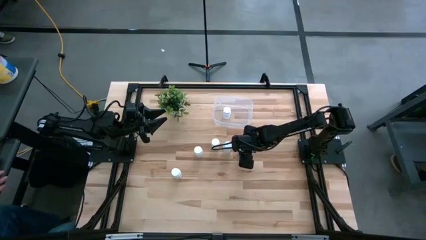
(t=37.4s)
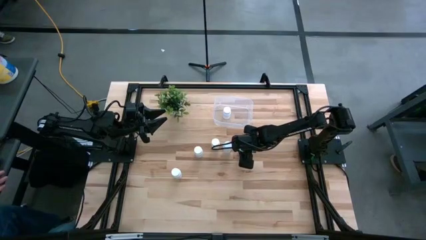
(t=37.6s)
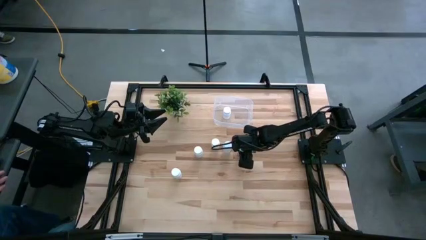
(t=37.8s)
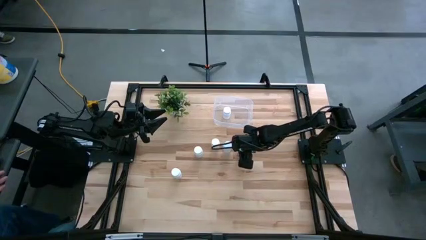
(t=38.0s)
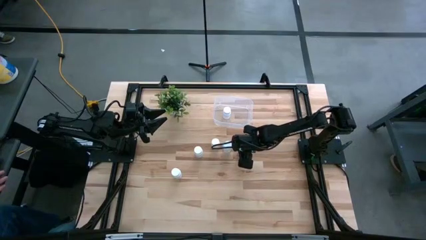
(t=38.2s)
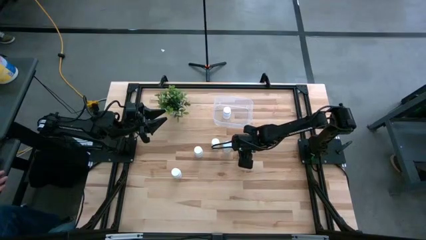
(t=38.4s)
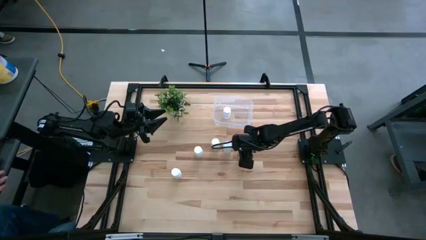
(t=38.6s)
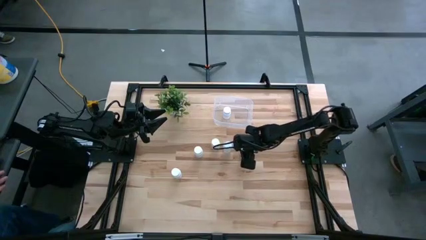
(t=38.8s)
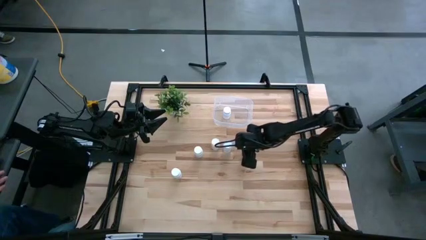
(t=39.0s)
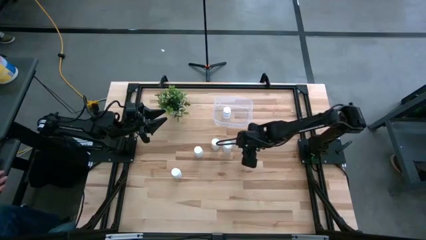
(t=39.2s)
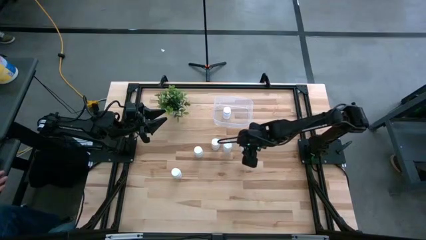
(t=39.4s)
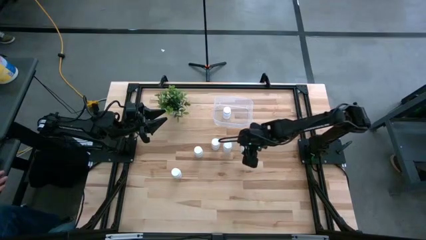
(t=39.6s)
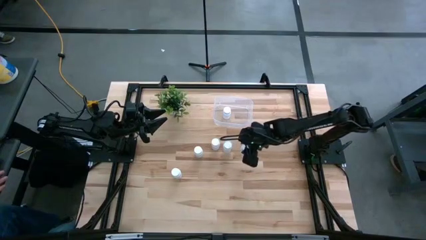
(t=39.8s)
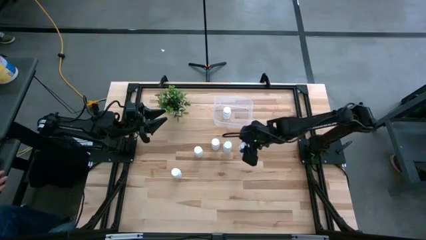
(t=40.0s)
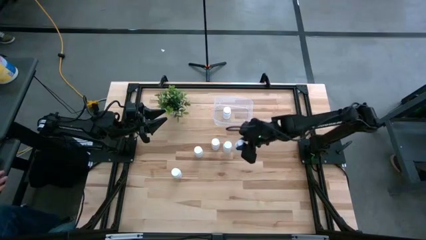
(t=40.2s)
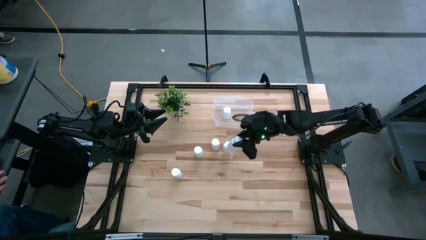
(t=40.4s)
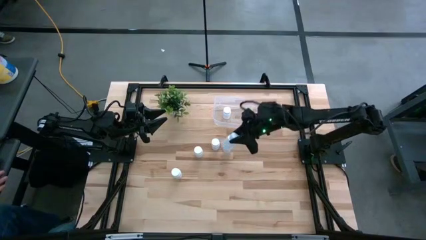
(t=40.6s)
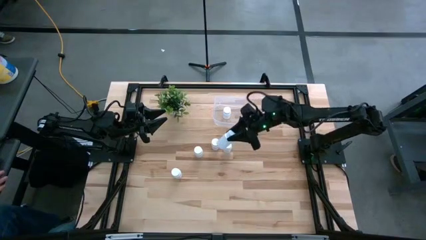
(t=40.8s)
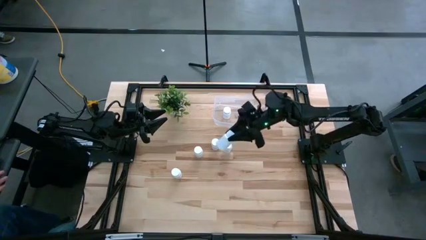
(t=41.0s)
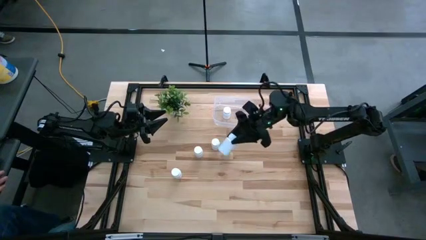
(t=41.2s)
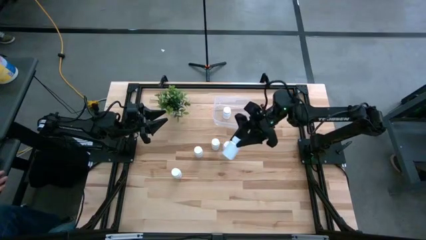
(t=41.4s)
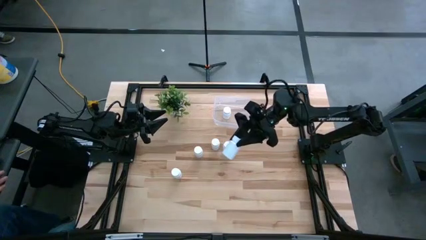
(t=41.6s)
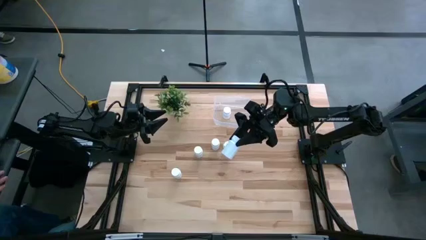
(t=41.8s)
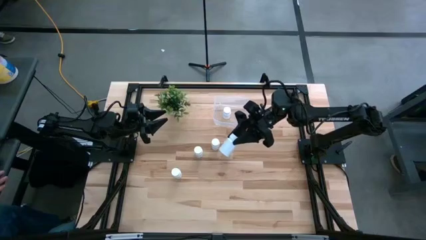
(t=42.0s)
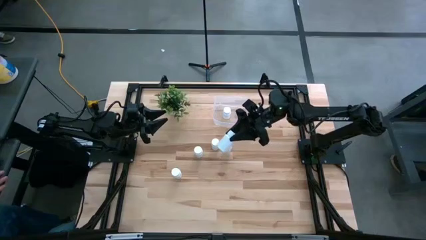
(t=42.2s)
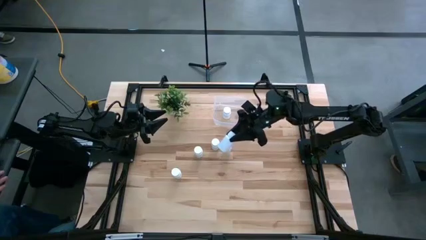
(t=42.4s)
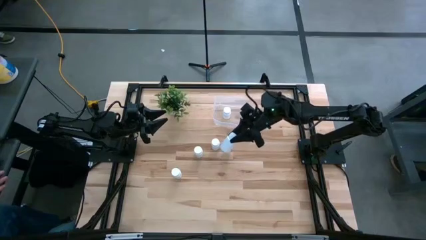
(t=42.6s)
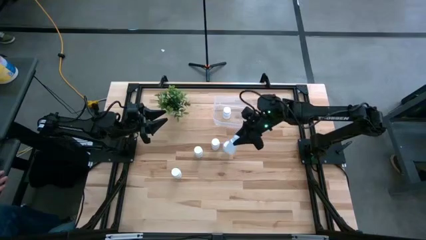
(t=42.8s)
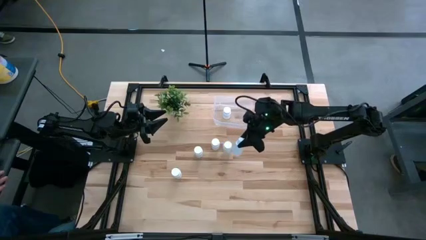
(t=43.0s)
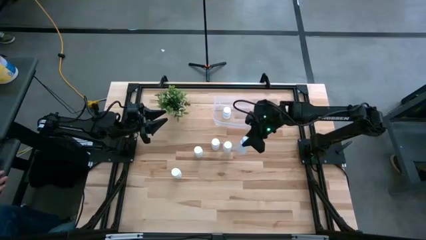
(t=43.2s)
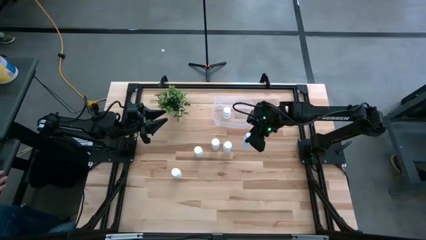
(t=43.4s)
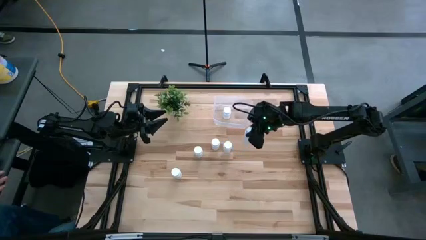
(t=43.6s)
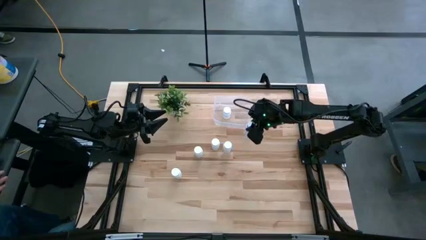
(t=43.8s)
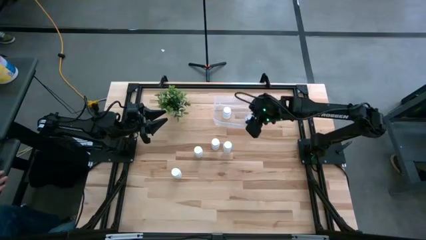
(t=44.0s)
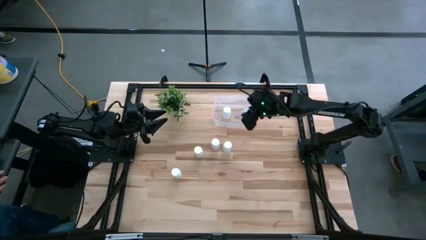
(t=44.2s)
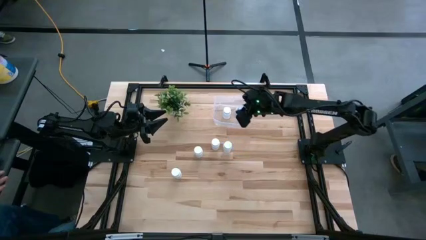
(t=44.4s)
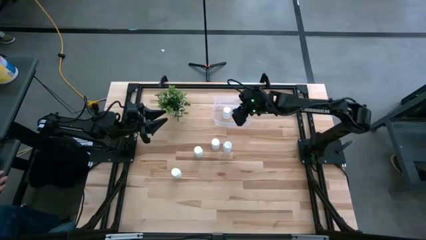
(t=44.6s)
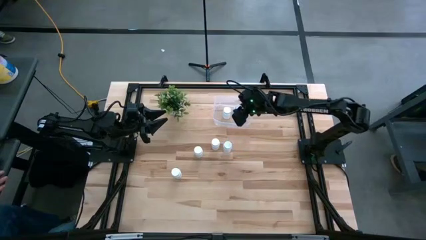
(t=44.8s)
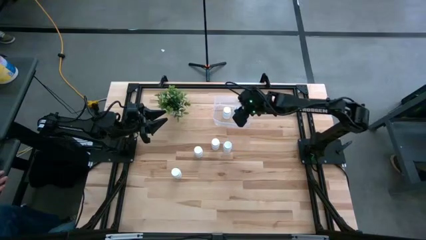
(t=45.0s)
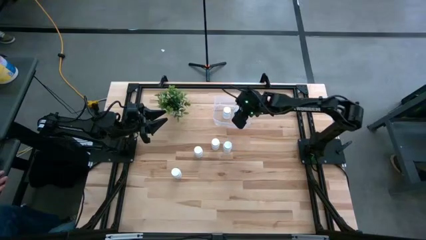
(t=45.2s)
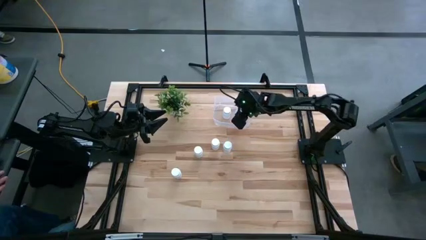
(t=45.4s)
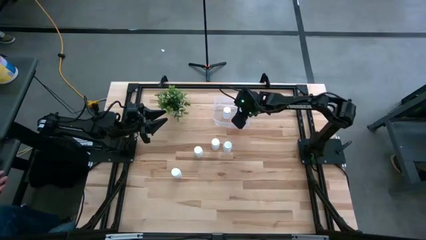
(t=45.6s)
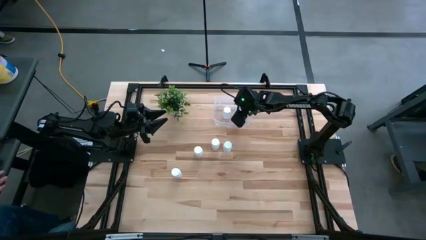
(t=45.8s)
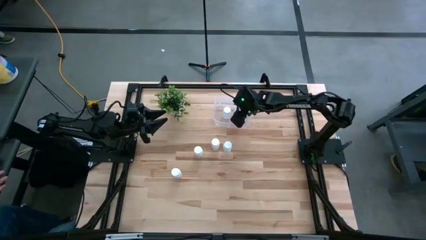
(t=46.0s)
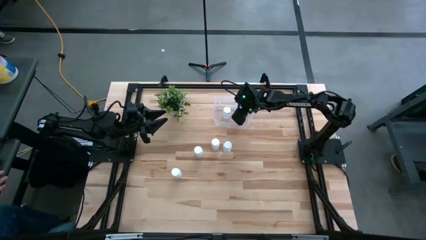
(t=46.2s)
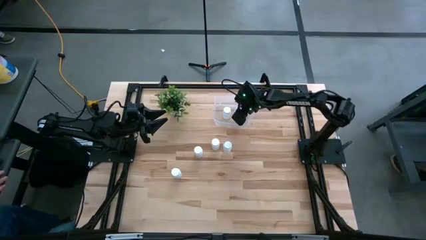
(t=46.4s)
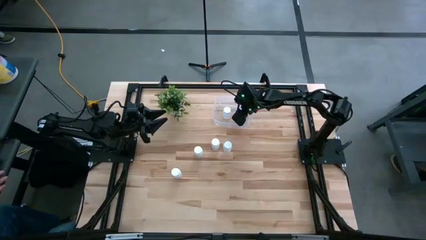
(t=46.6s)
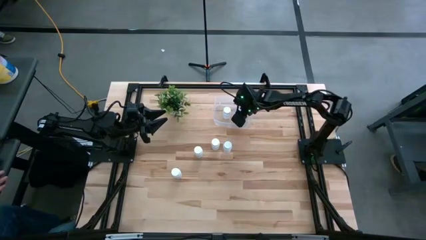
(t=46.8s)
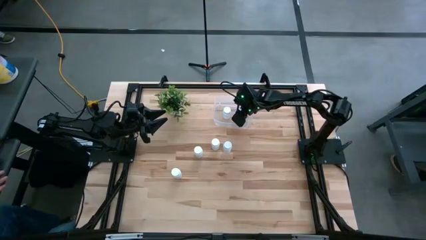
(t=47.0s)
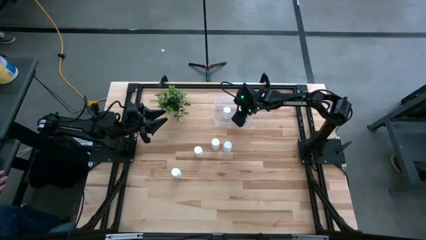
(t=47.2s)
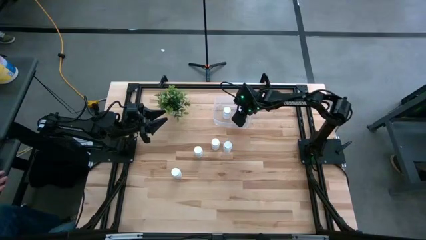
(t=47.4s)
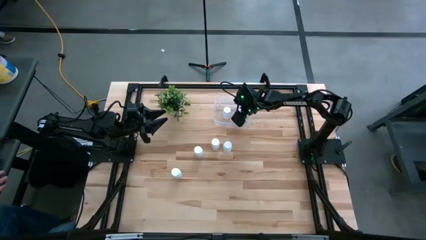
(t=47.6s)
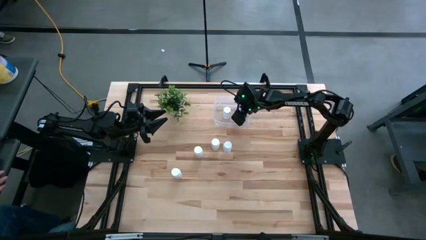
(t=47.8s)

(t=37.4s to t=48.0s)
Task: Pick and place pill bottles into a basket
Put the white pill bottle into the transparent container
